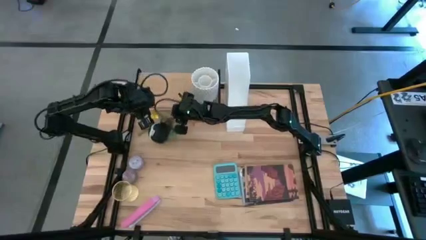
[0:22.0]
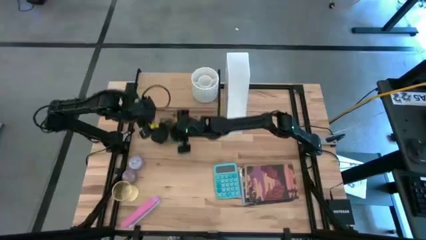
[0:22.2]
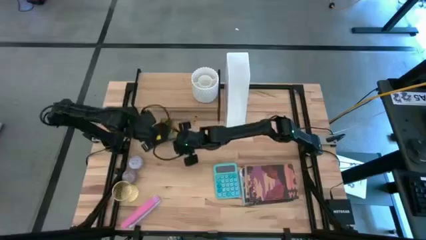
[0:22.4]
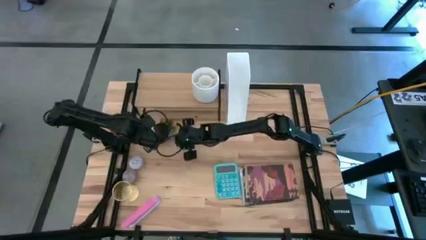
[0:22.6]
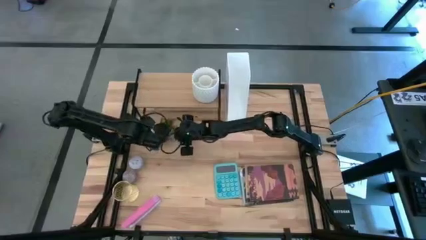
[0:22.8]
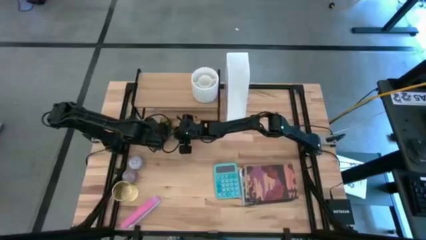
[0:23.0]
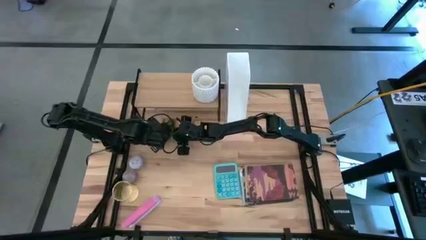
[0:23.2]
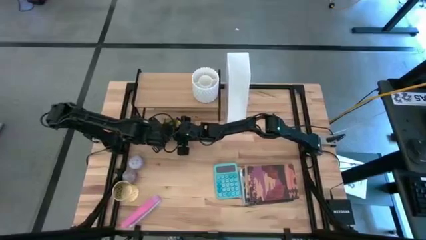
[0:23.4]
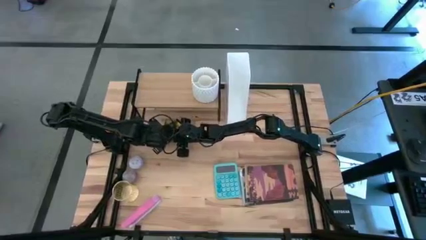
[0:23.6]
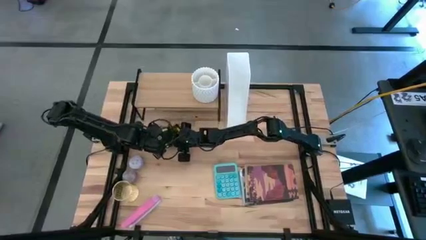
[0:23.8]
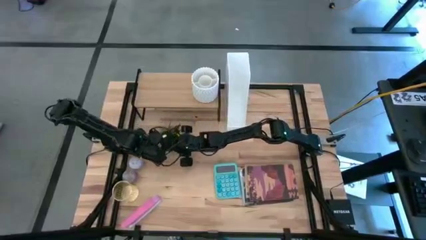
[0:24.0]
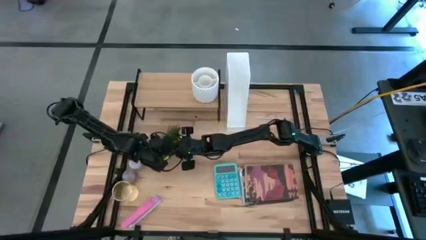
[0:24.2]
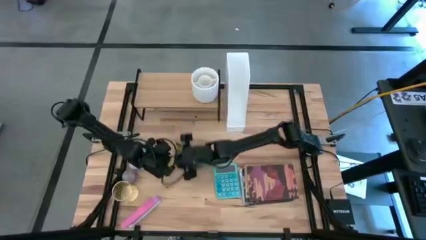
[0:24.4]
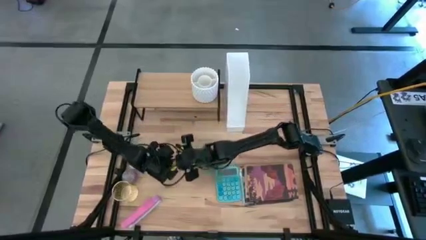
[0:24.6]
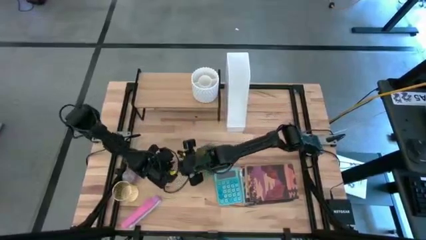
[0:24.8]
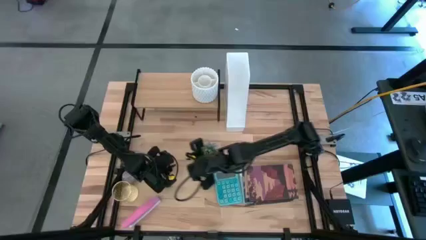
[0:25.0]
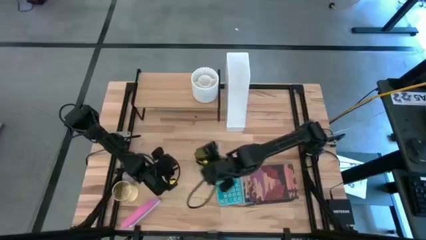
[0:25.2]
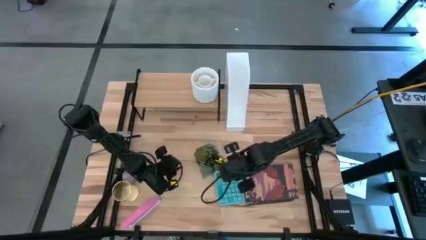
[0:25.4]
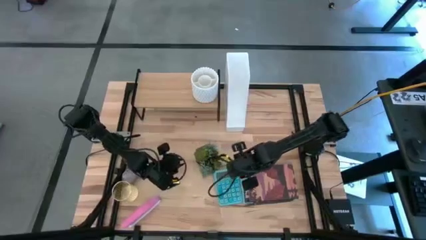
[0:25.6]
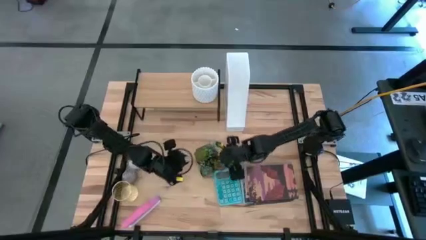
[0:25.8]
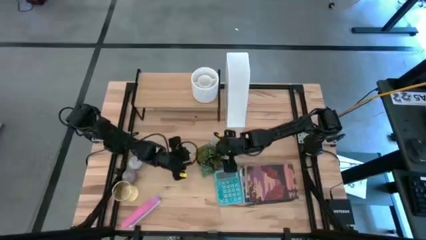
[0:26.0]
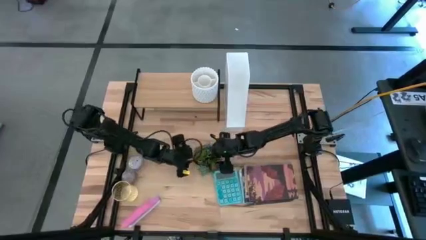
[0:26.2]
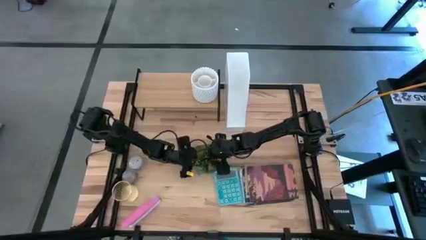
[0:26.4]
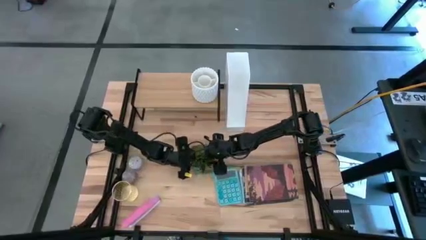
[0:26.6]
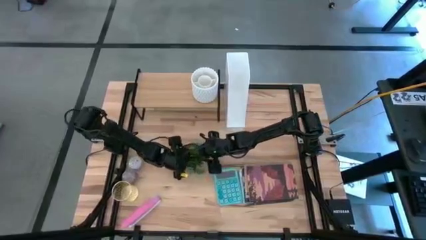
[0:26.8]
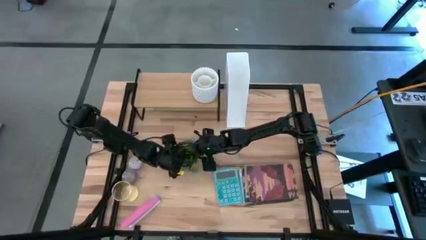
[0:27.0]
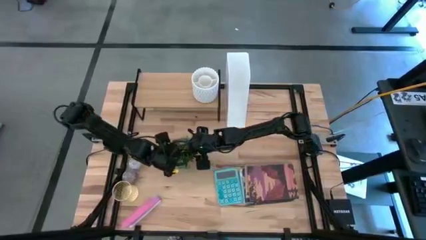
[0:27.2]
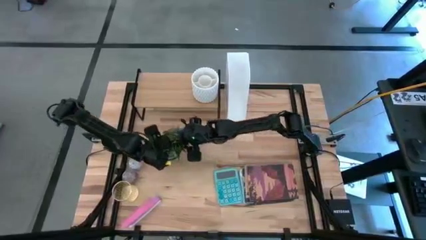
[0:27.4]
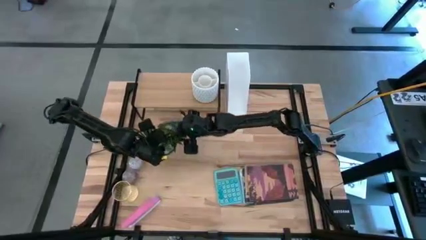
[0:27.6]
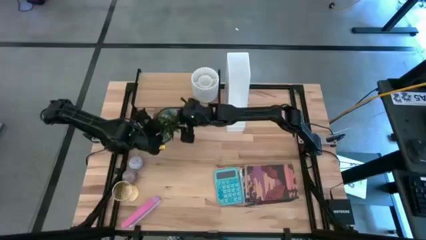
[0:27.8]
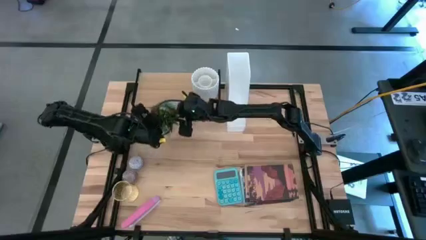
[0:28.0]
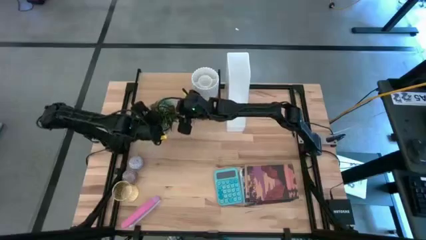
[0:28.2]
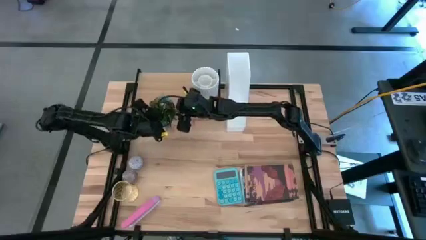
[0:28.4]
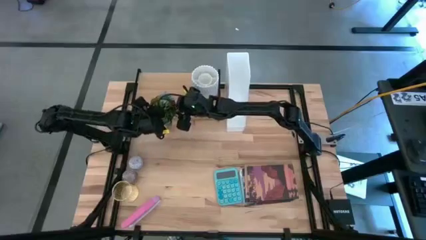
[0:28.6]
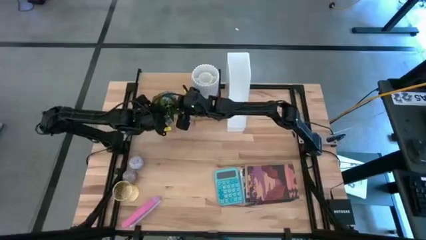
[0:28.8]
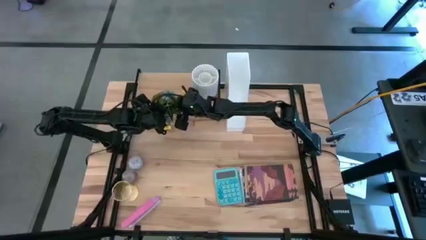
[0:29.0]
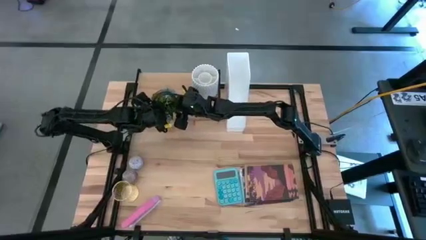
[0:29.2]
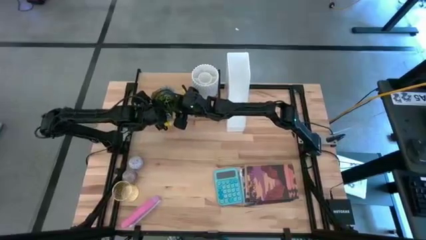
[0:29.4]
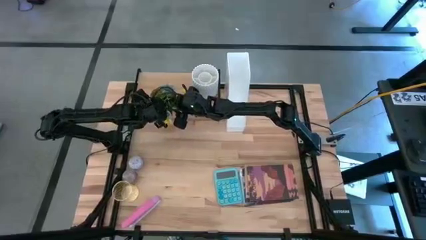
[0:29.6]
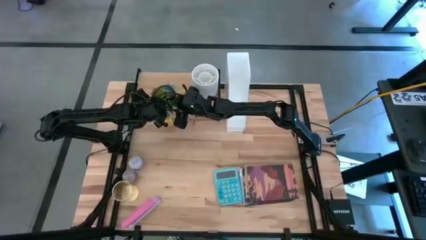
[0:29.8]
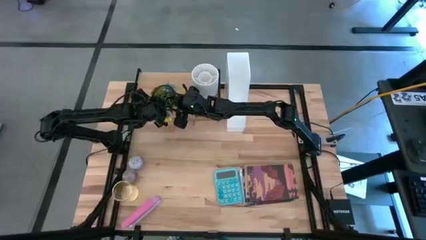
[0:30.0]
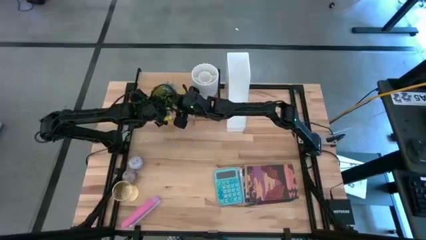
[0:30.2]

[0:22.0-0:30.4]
Task: Stock shelves
Put the potted plant on the shelf

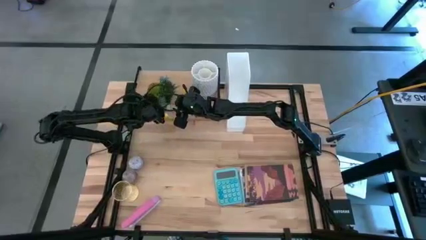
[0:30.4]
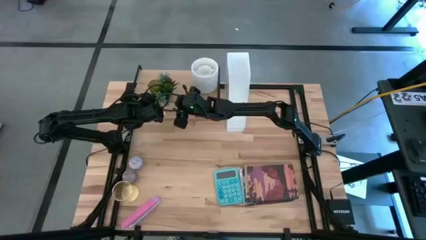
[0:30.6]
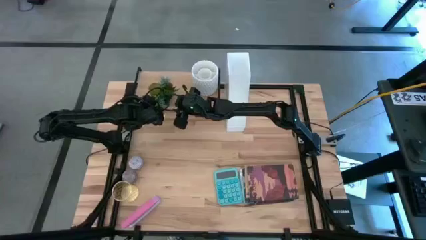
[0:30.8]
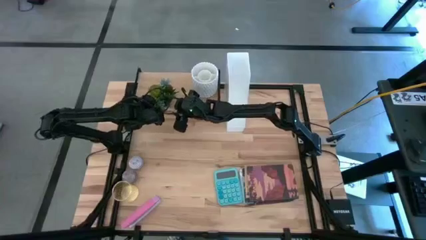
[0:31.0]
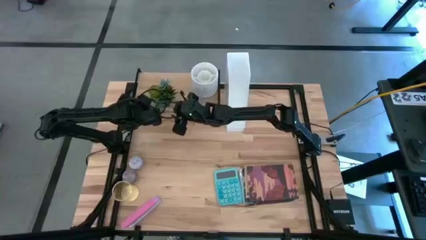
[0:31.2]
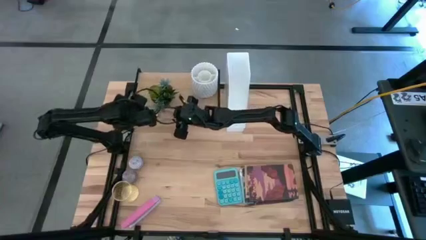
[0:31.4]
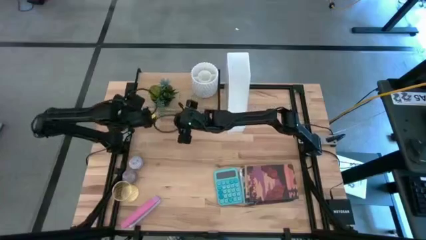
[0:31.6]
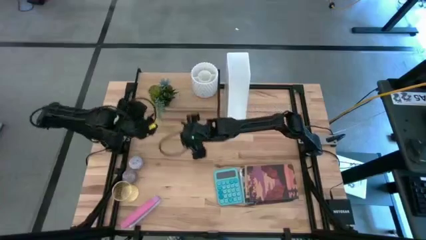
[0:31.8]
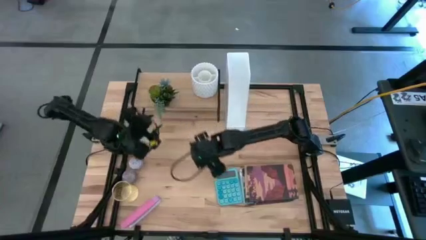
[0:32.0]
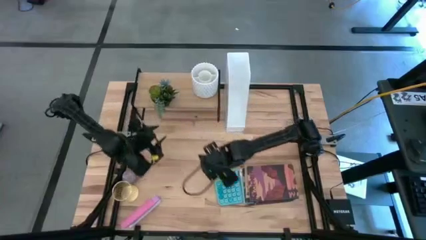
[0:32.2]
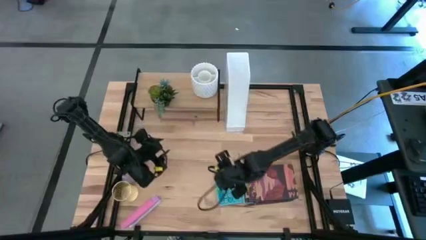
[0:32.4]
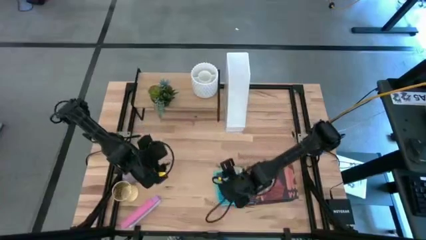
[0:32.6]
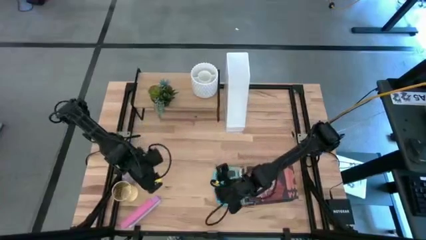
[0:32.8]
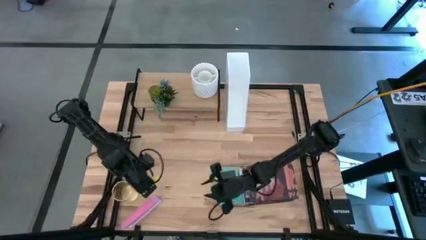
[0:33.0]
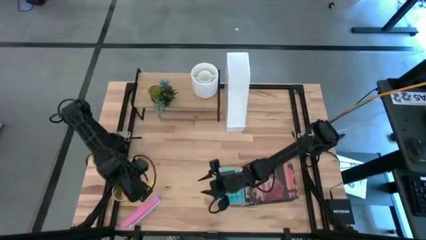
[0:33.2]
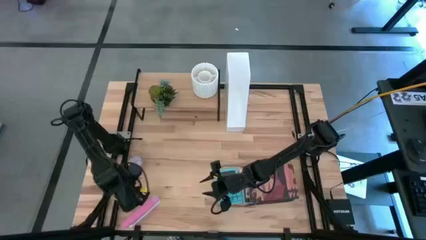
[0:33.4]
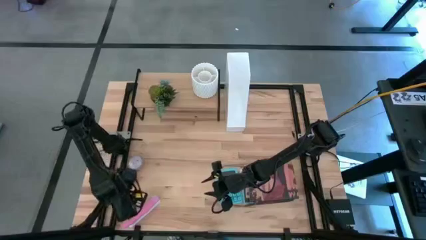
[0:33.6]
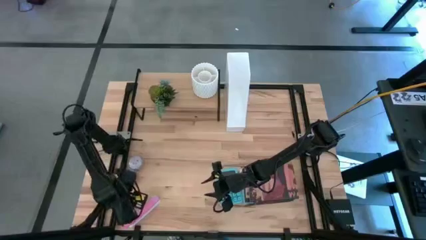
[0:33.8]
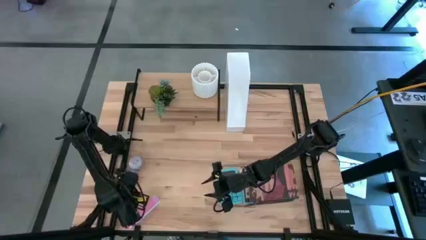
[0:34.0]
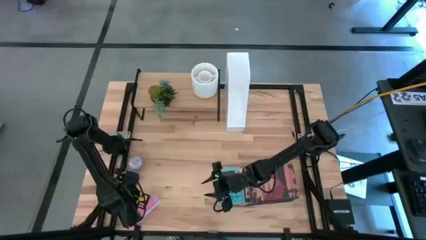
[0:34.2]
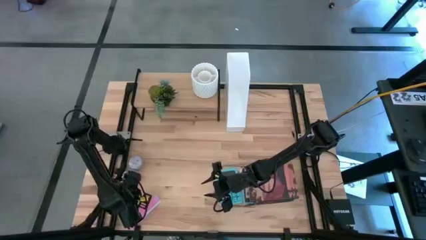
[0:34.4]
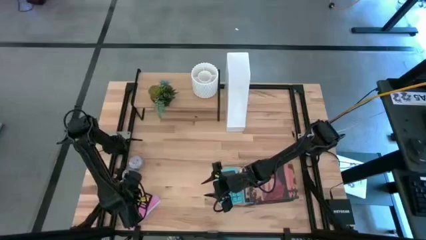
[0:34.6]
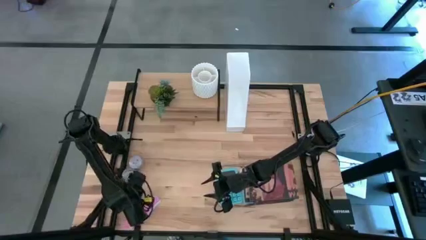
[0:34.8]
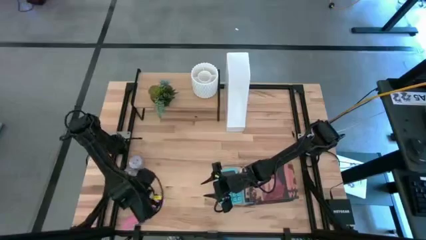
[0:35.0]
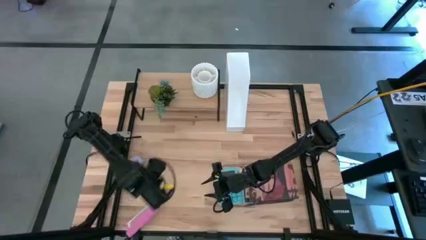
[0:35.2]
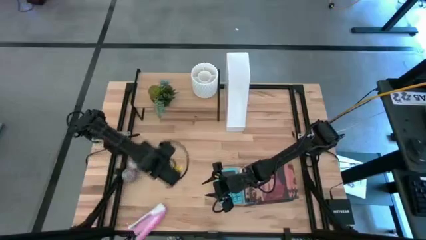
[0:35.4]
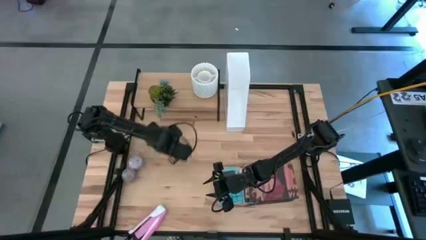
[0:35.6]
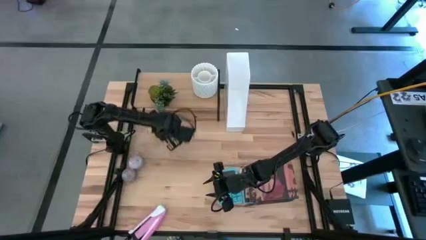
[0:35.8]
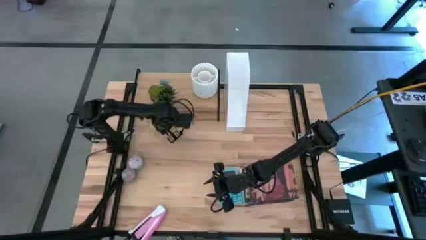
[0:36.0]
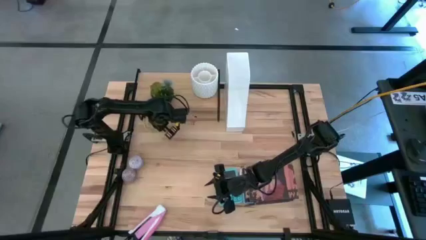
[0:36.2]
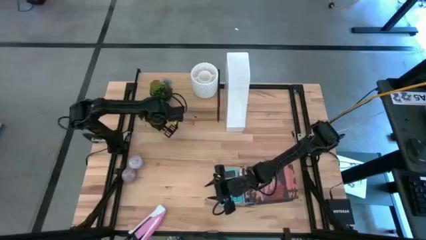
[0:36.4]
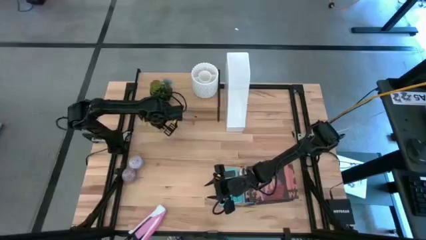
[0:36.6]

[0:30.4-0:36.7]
Put the gold pen organizer under the shelf

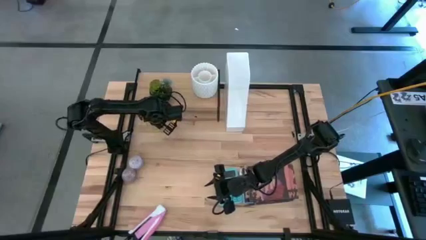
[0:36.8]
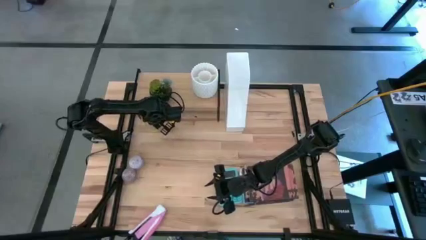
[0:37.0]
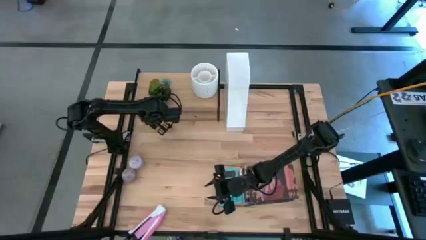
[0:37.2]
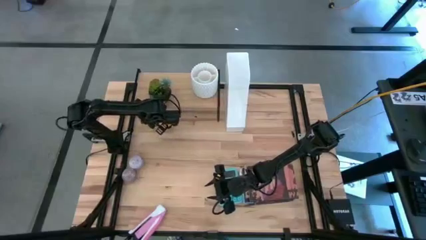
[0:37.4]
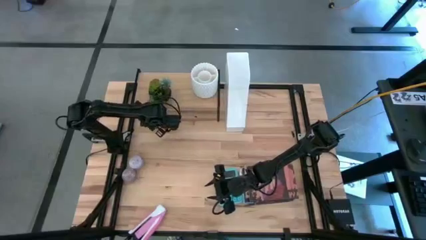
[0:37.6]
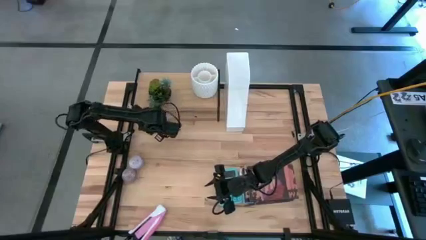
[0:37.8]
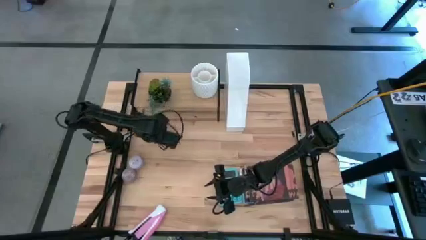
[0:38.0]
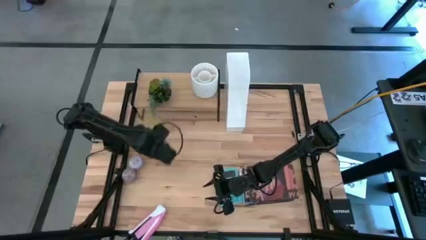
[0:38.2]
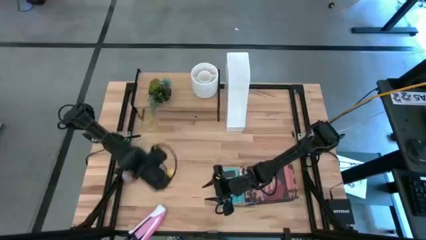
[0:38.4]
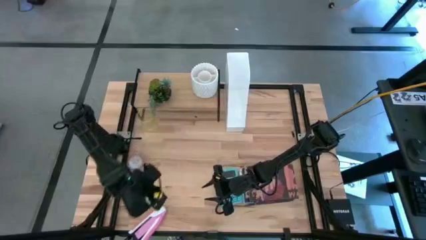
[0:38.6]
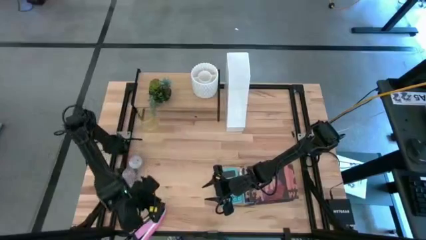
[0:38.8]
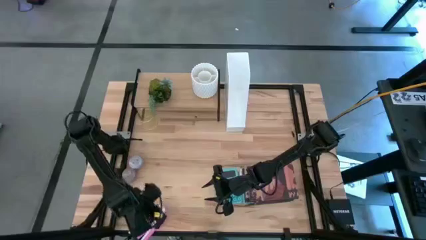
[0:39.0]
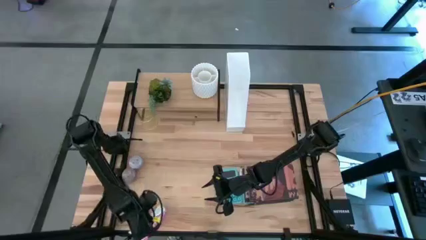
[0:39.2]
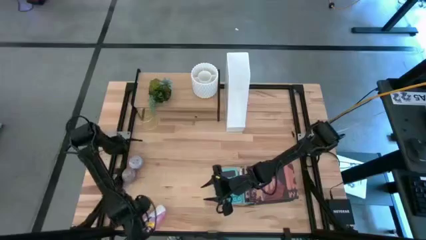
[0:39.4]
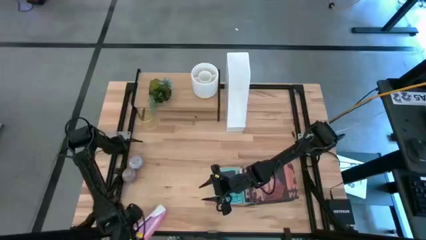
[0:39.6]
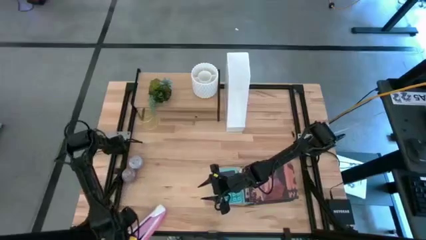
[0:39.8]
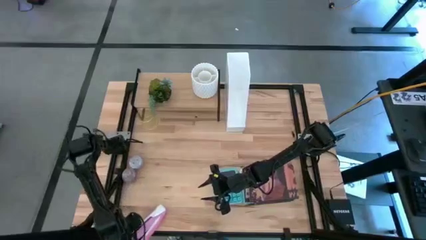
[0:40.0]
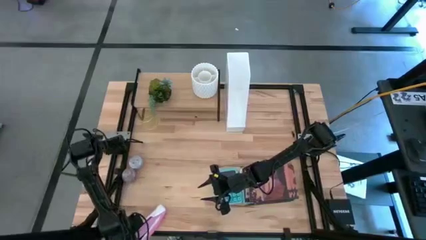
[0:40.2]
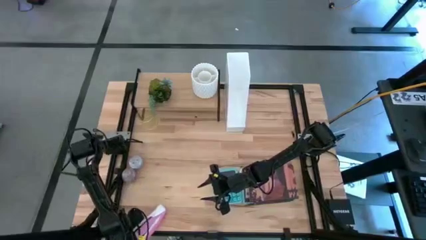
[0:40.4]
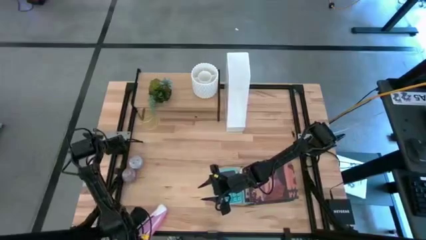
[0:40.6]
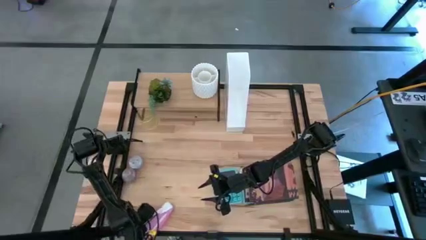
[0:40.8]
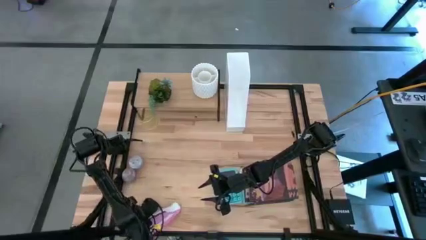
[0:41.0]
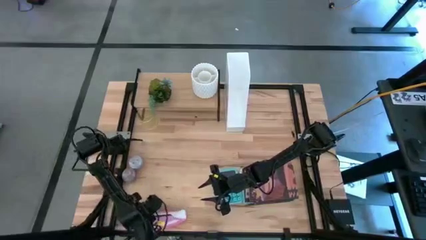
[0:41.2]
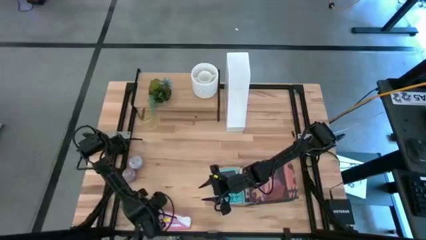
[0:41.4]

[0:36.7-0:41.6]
Put the pink stapler under the shelf
